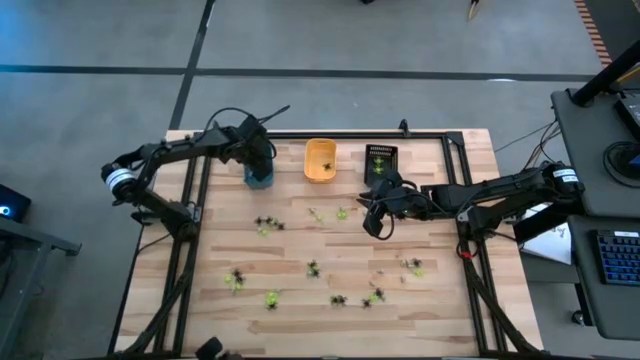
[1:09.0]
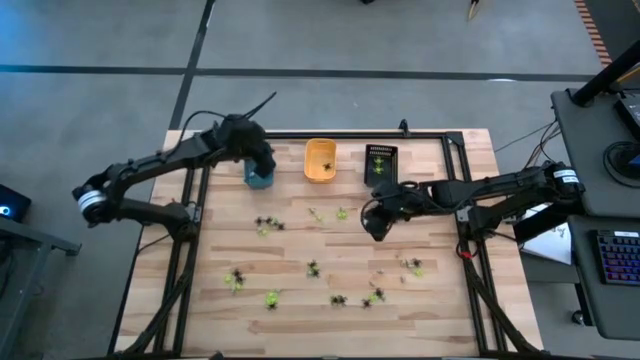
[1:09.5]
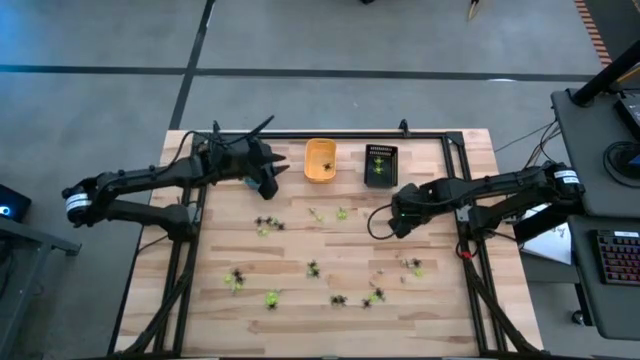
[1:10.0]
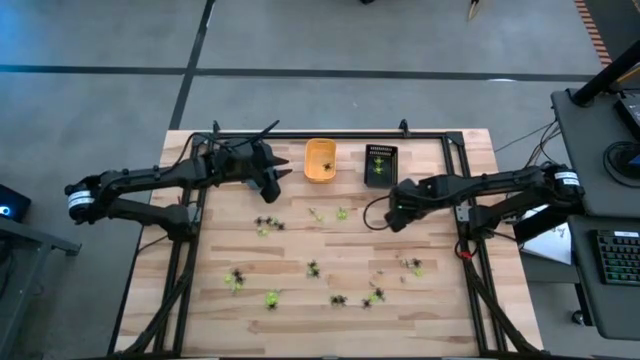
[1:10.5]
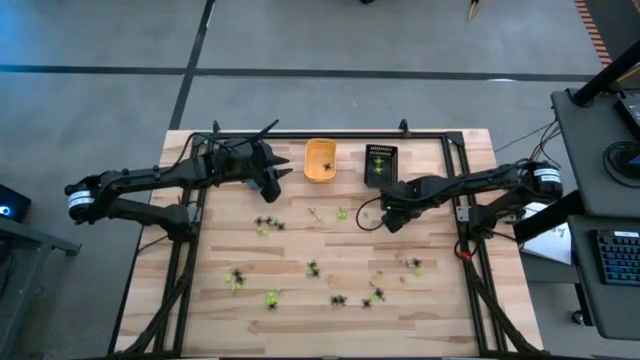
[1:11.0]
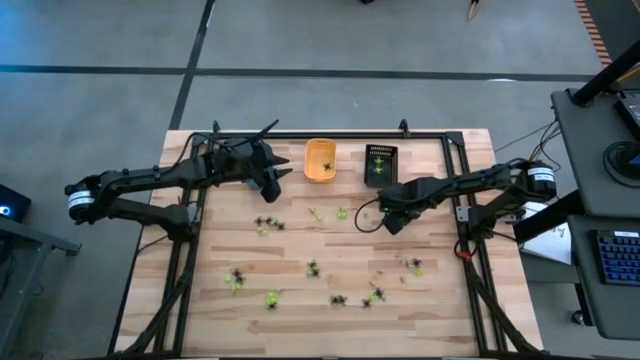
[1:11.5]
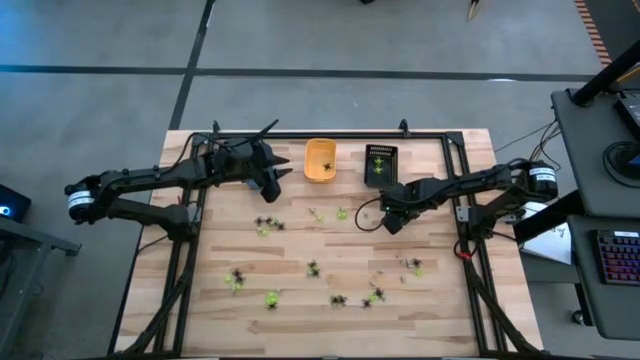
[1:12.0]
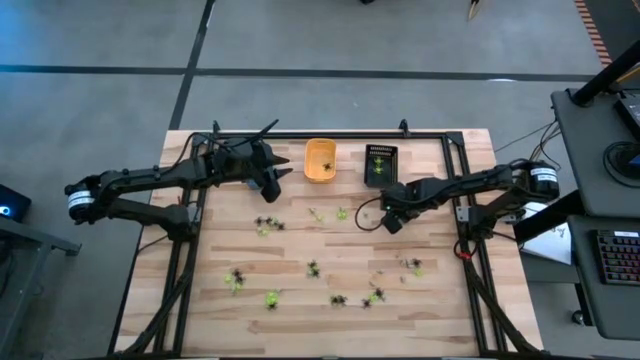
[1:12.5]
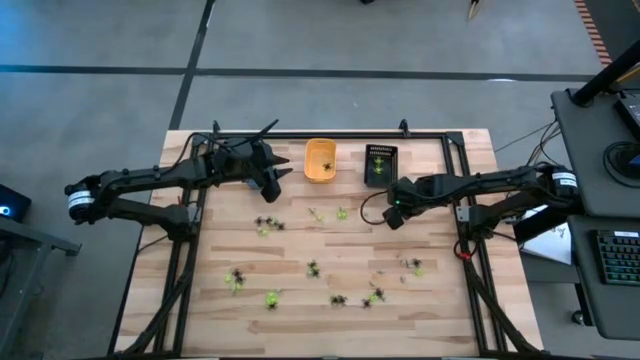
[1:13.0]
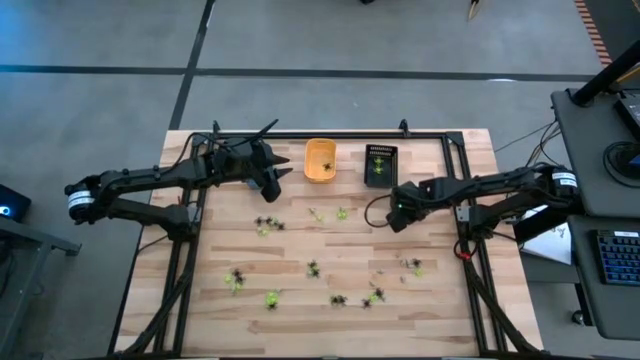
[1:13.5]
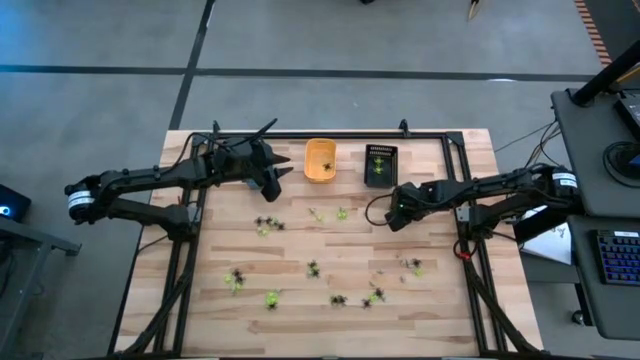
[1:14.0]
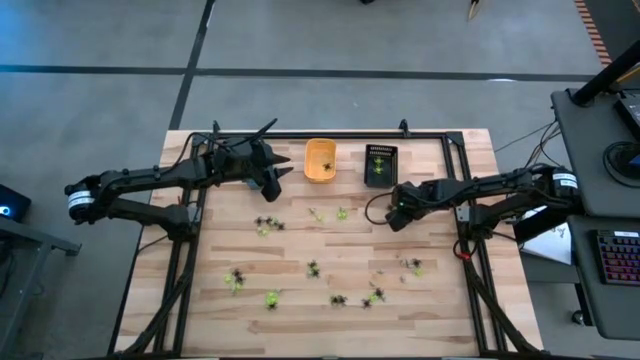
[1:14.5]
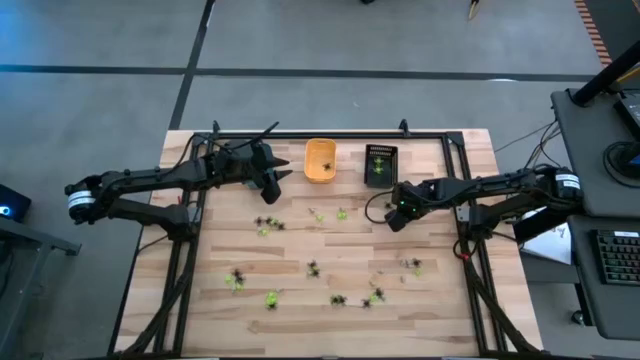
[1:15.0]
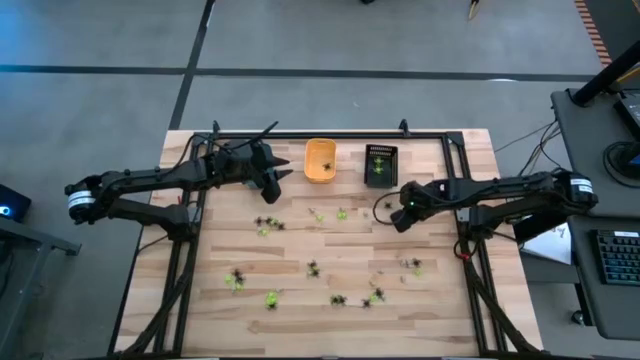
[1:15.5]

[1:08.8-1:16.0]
Task: Sort Halloween decoration
Put the black spider toy into the orange bin

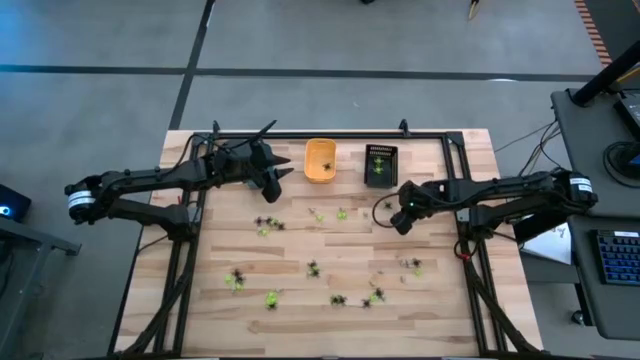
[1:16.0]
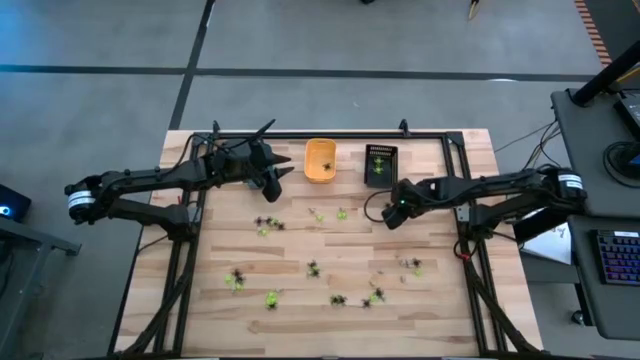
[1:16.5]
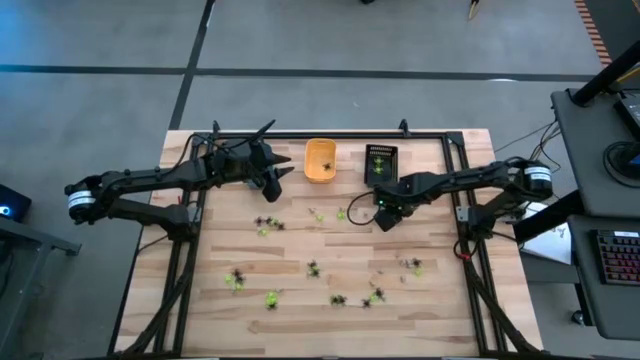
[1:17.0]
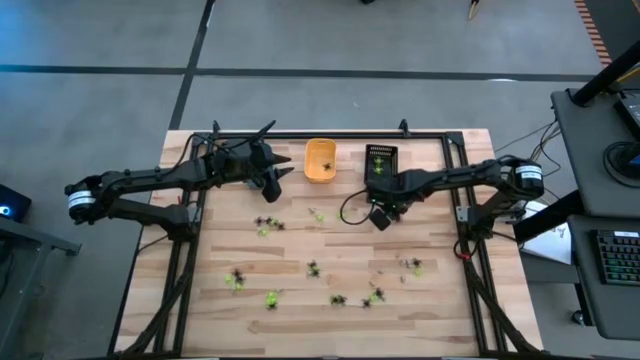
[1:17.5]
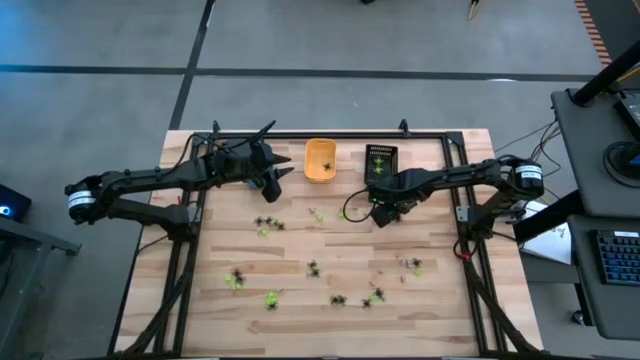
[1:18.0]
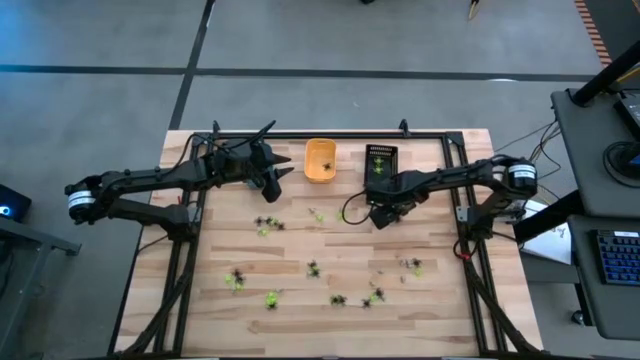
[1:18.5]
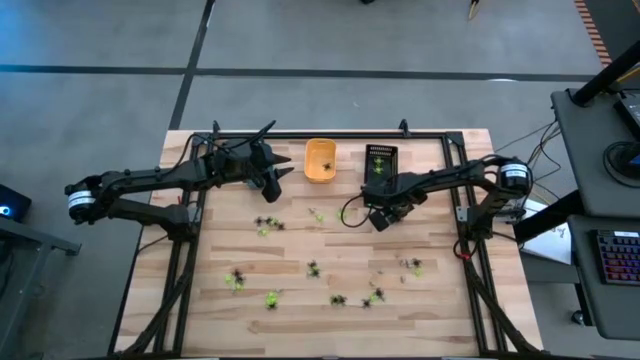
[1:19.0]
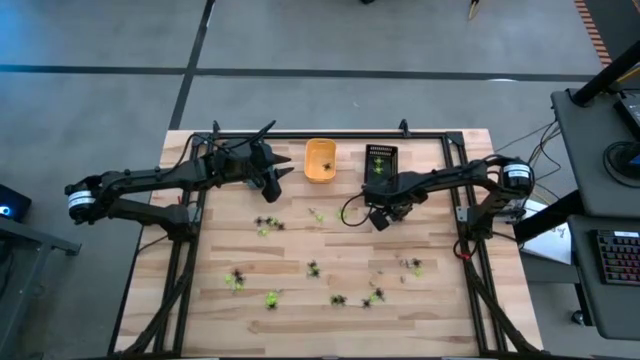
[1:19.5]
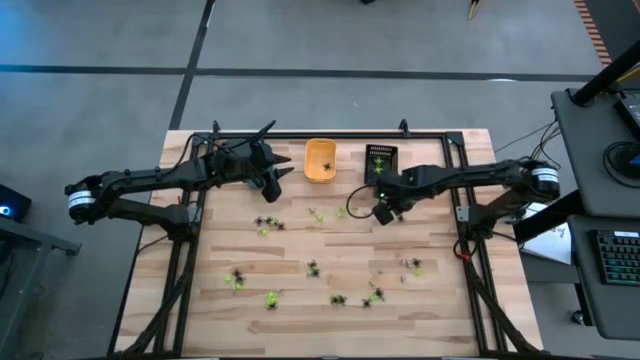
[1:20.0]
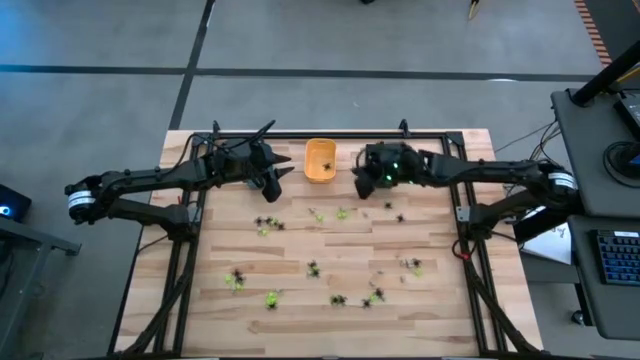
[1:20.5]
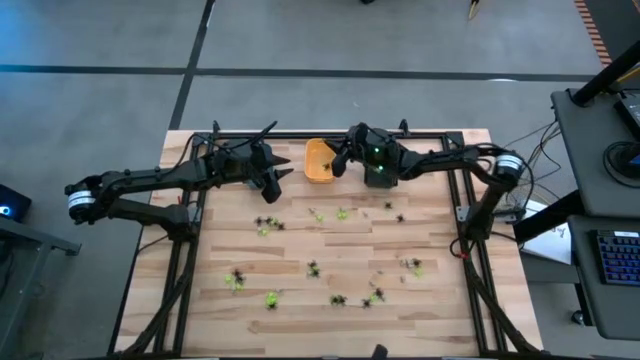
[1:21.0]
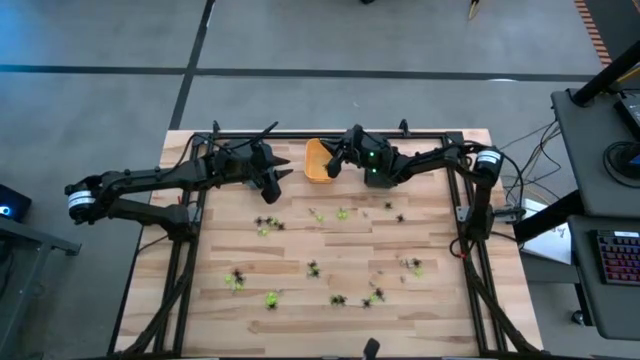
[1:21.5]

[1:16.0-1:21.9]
Put the black spider toy into the orange bin

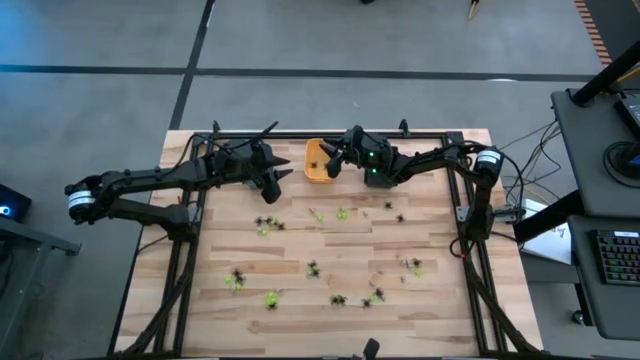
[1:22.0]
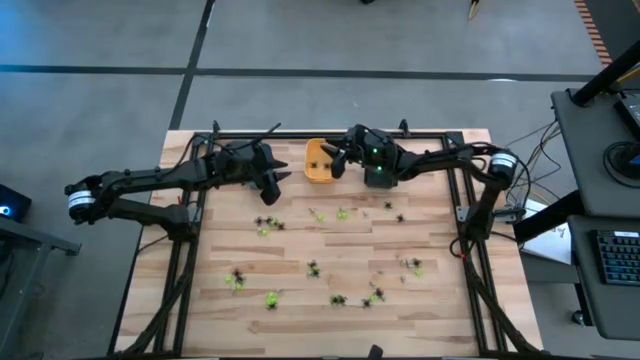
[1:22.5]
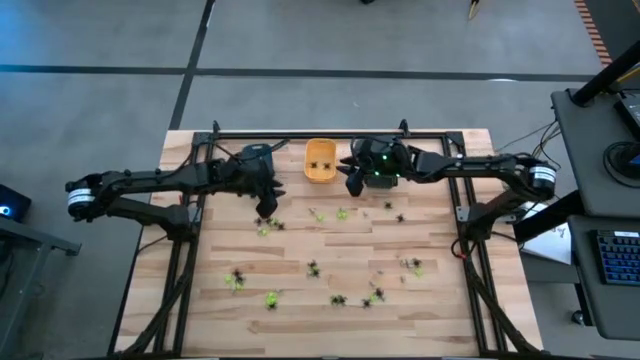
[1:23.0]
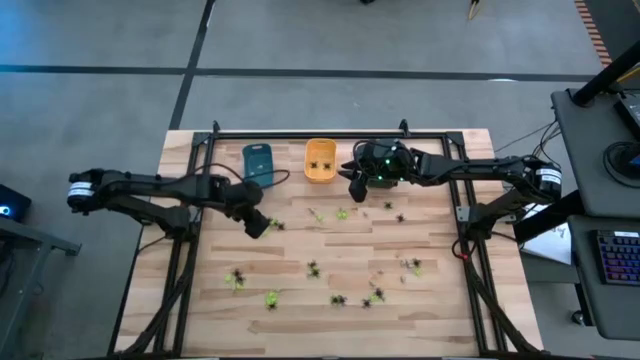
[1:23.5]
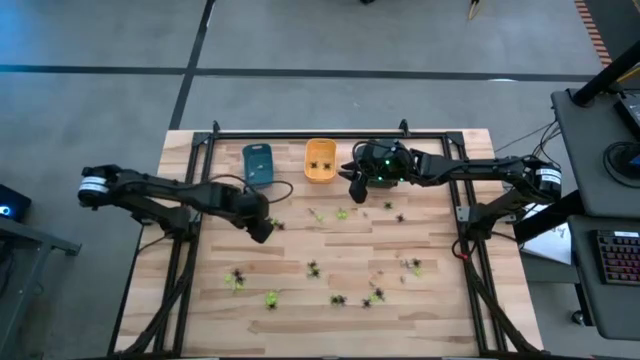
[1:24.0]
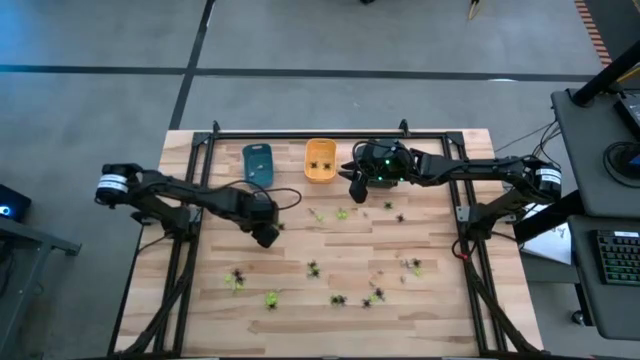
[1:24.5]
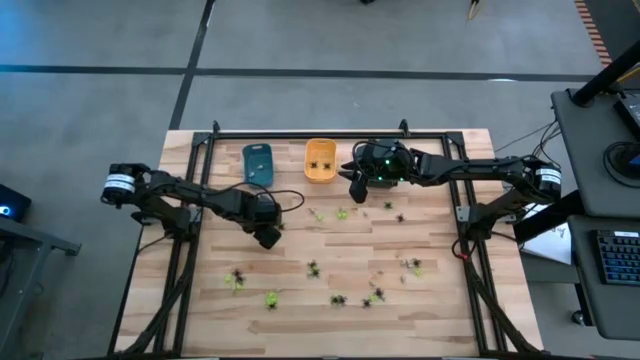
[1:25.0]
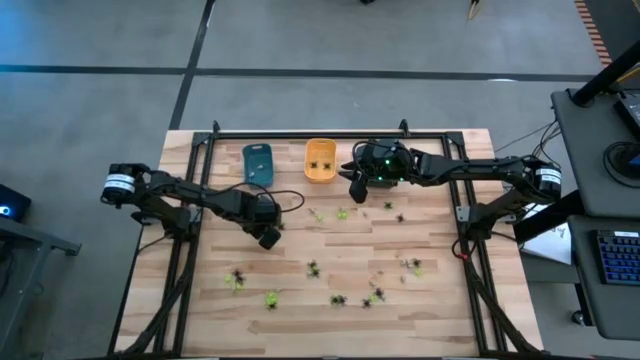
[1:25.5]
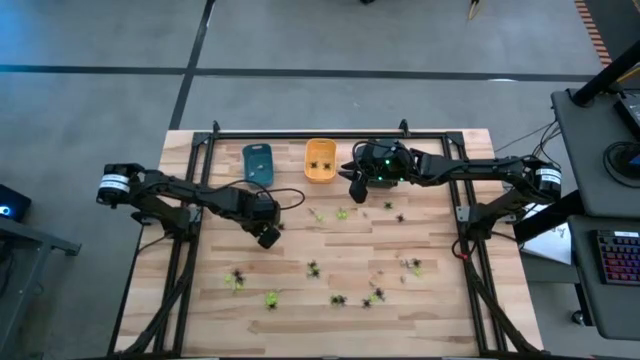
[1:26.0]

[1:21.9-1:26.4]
Put the white skull toy into the blue bin

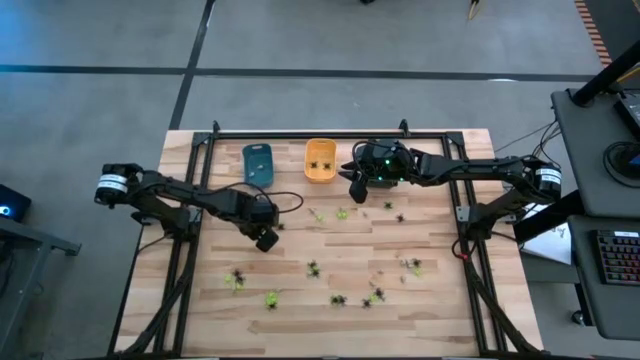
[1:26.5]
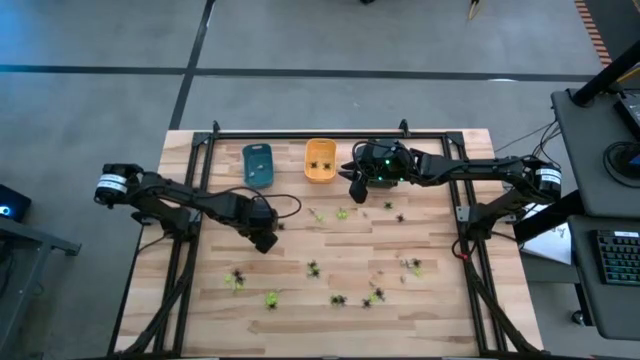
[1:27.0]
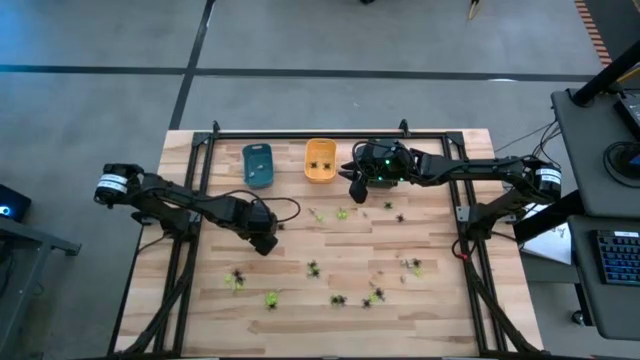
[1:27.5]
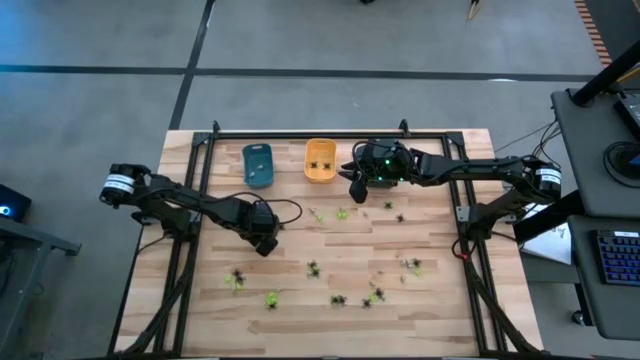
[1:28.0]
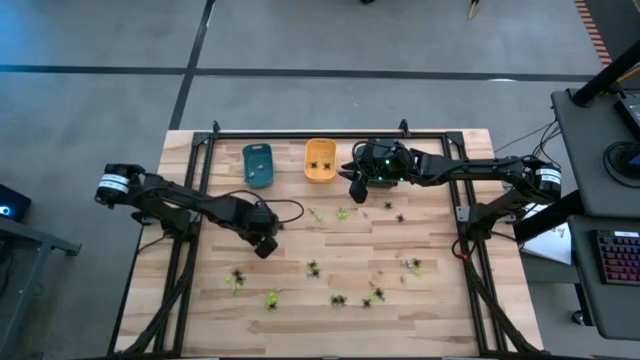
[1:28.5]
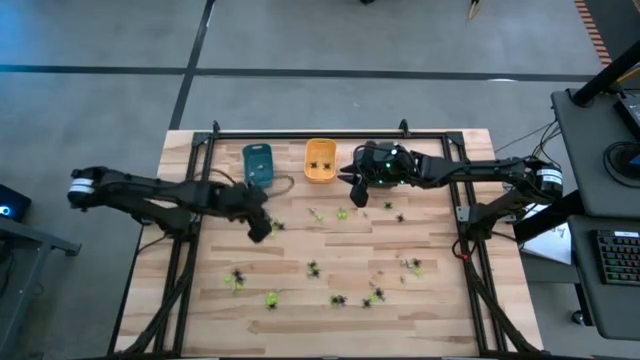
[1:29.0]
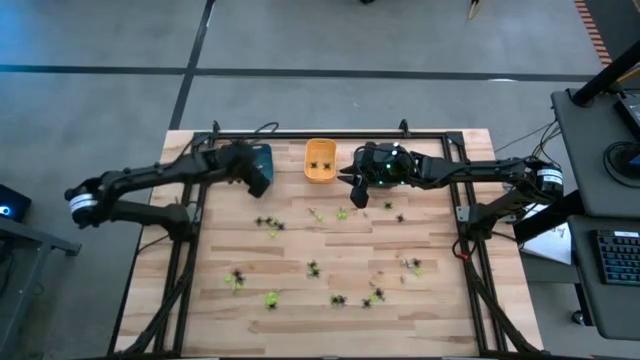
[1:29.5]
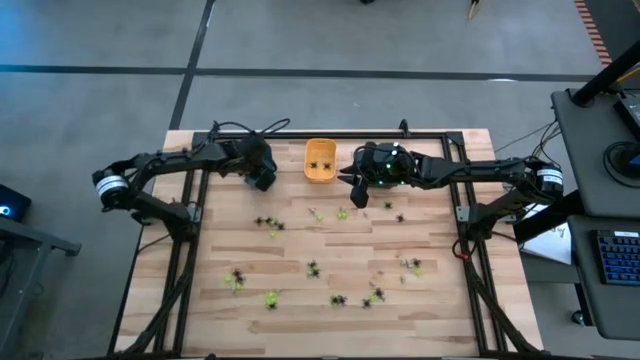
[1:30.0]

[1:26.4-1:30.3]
Put the white skull toy into the blue bin
